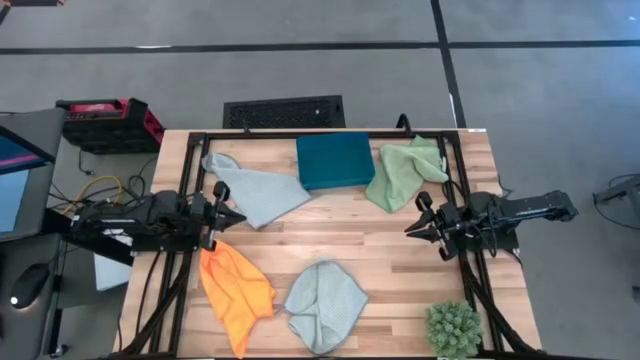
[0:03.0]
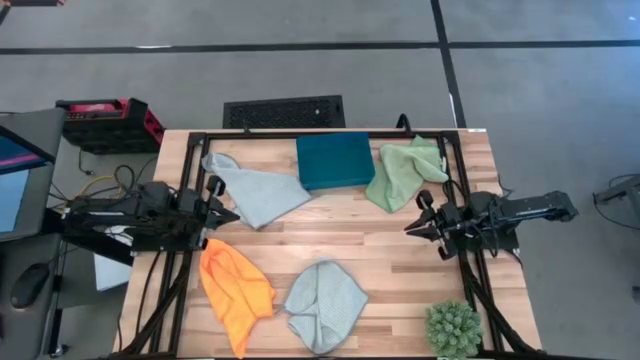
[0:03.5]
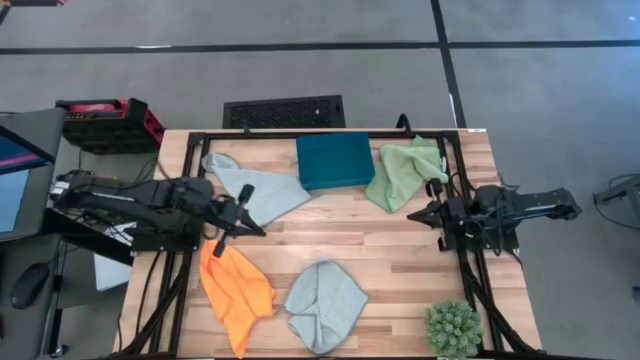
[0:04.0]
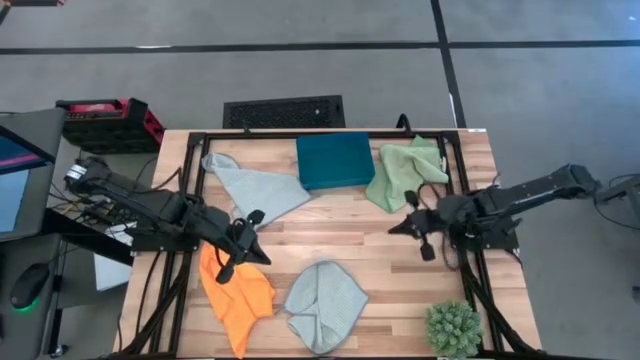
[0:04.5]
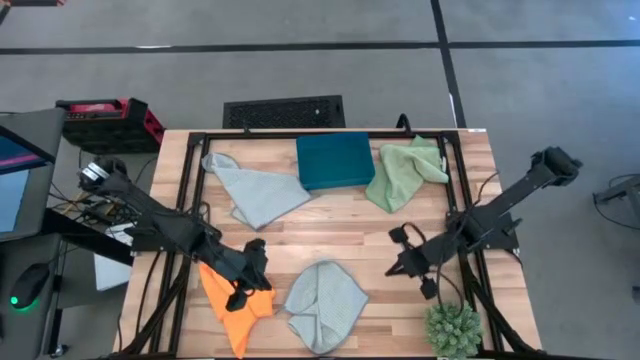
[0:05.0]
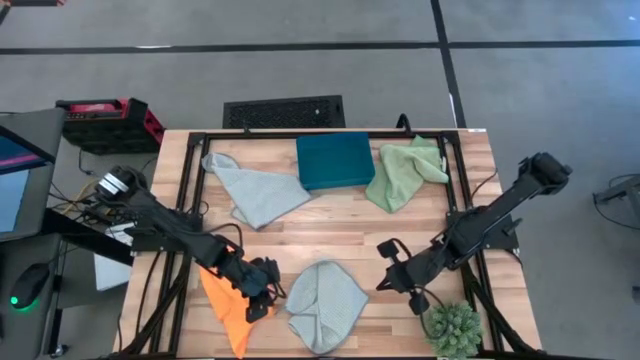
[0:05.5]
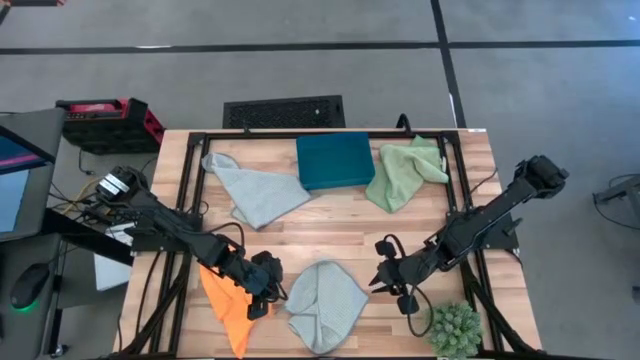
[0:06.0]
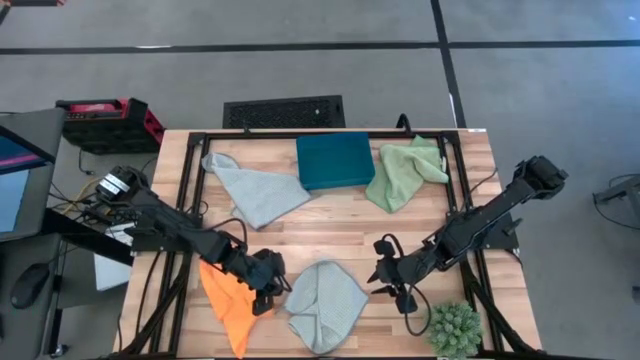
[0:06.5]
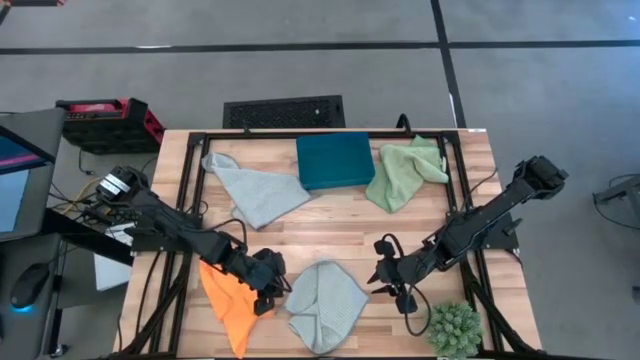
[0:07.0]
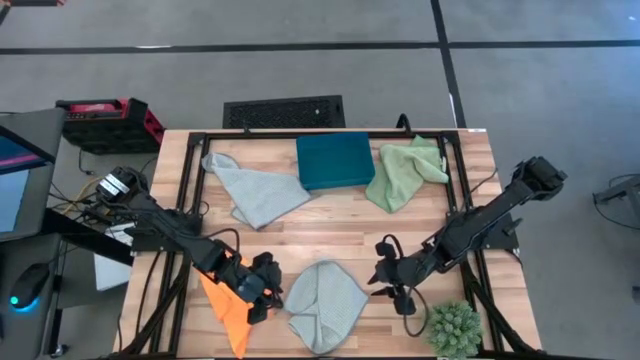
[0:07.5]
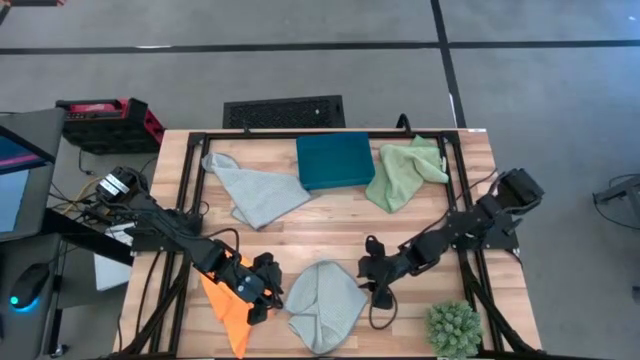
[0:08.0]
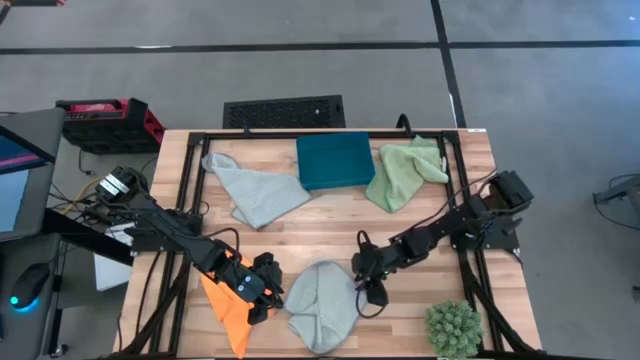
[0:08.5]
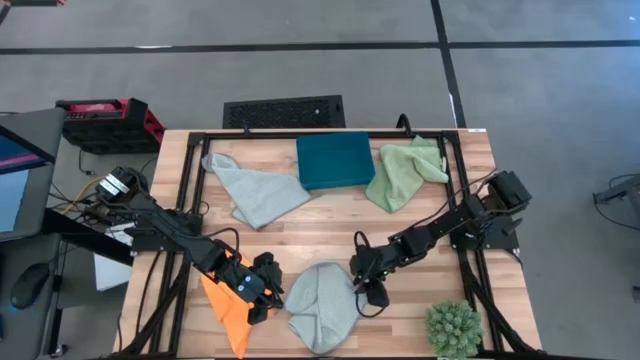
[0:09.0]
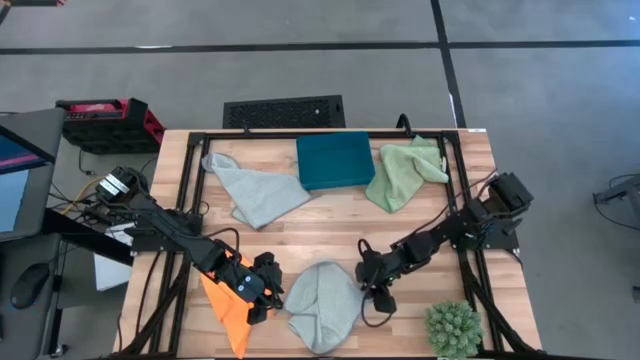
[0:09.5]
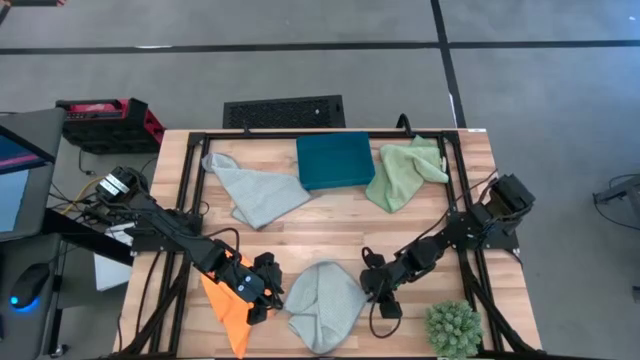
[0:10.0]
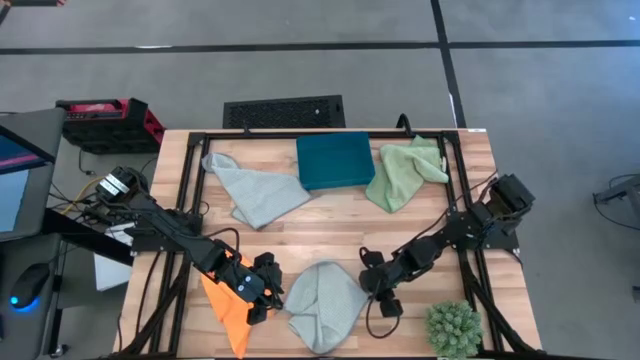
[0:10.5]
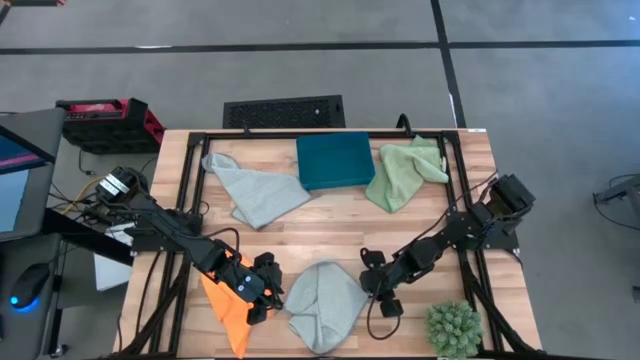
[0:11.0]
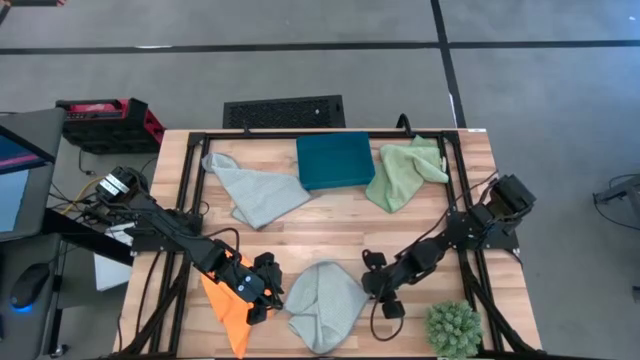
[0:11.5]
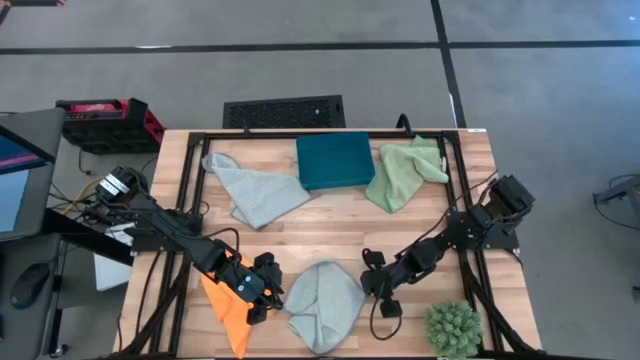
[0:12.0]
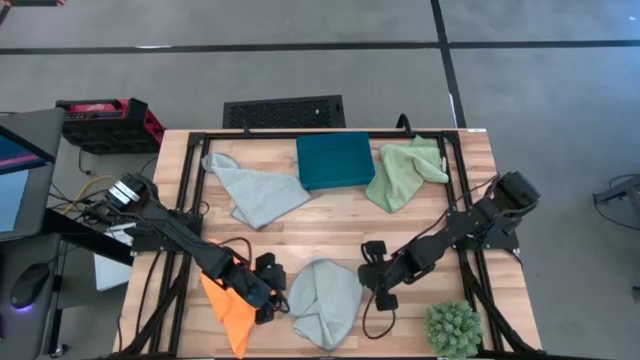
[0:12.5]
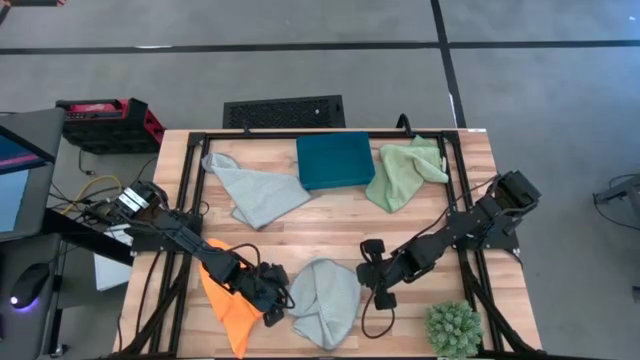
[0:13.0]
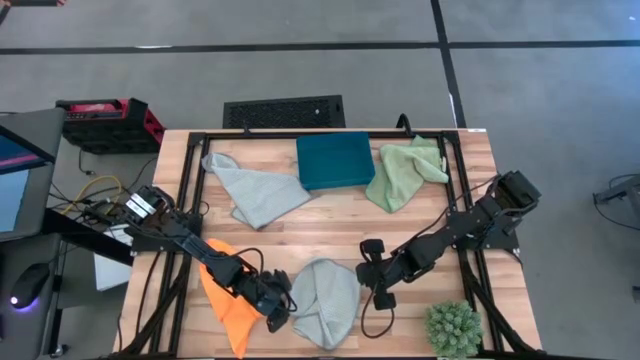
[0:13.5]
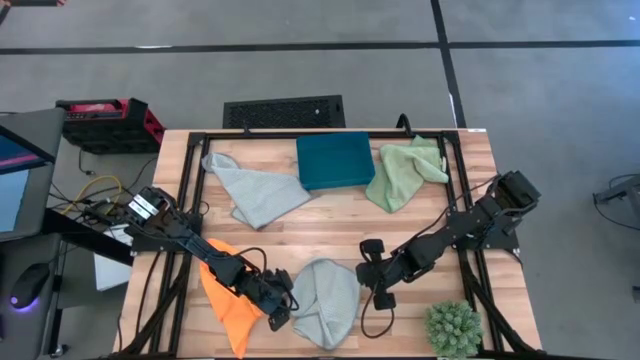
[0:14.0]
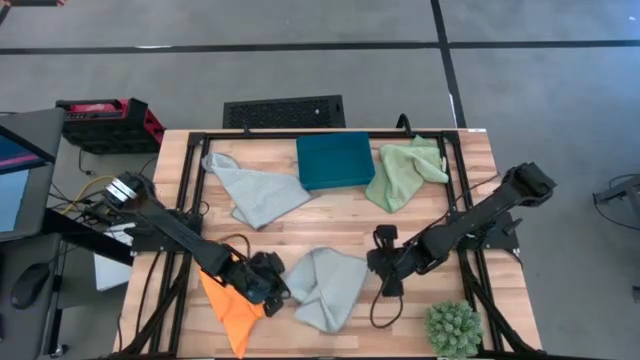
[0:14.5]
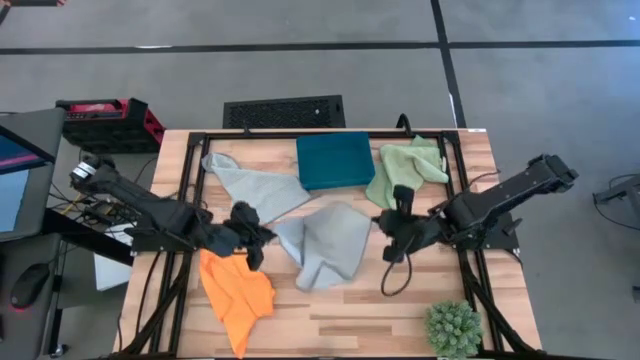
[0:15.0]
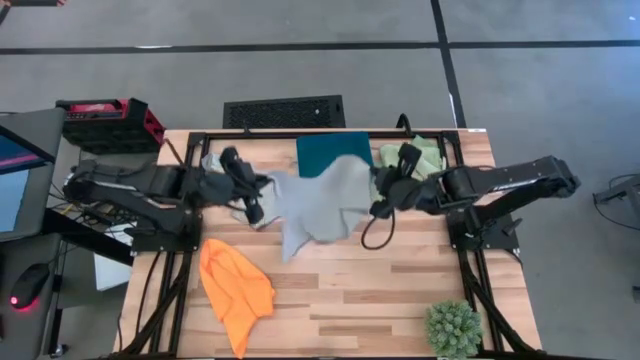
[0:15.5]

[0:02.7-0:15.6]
Task: Fold microfiber towels
Fold the bottom left gray microfiber cloth
